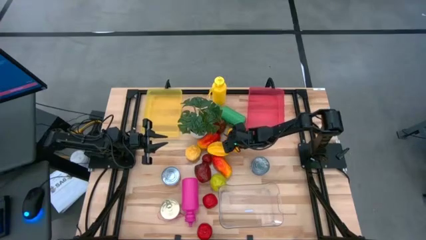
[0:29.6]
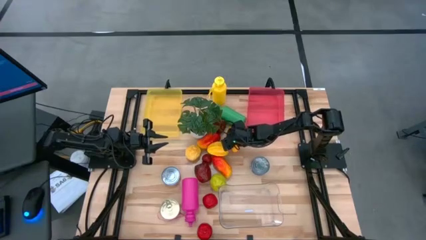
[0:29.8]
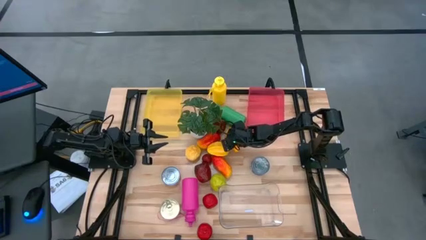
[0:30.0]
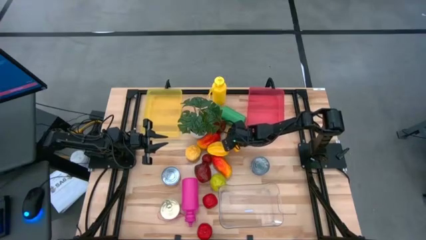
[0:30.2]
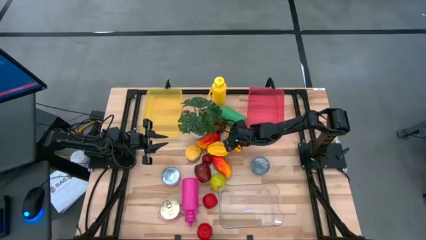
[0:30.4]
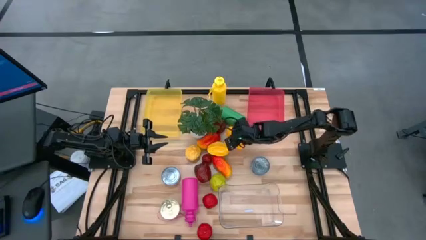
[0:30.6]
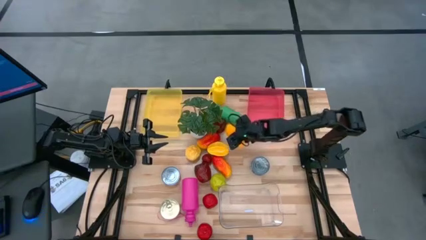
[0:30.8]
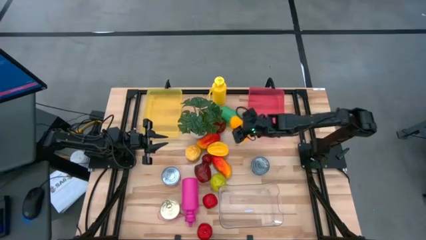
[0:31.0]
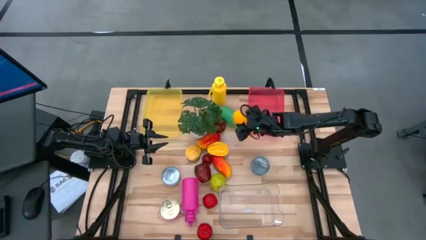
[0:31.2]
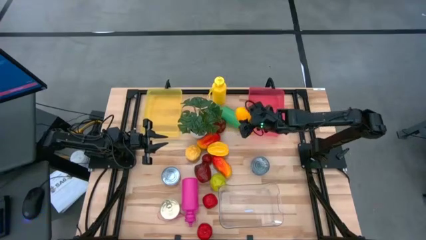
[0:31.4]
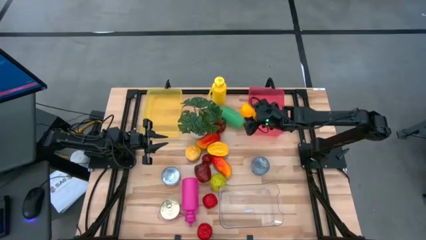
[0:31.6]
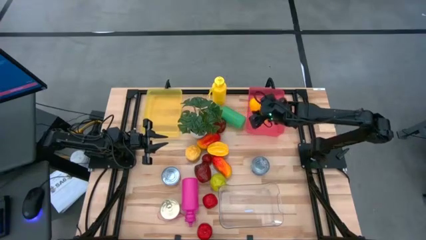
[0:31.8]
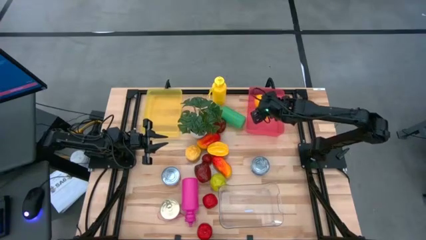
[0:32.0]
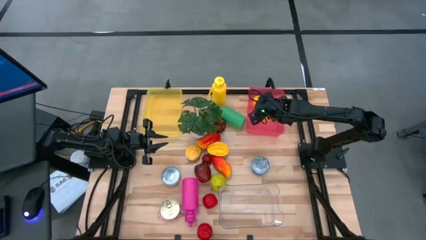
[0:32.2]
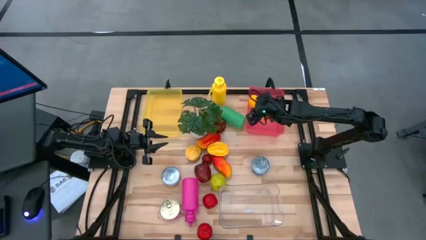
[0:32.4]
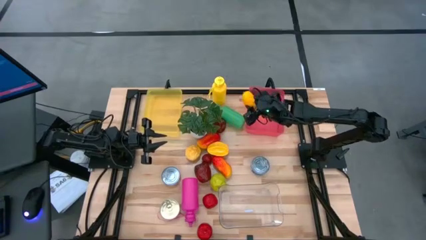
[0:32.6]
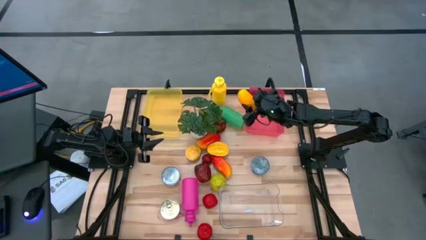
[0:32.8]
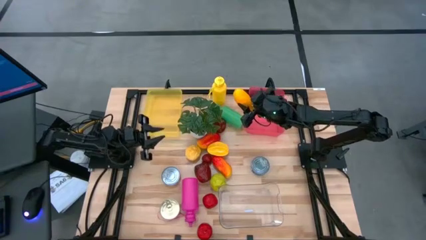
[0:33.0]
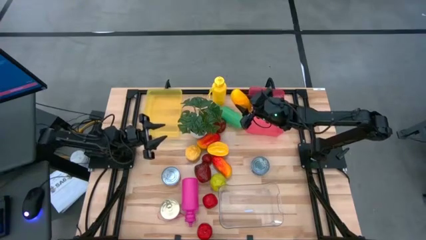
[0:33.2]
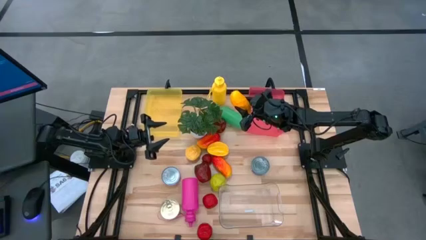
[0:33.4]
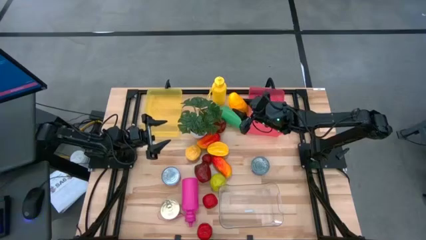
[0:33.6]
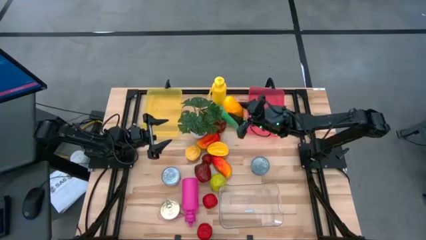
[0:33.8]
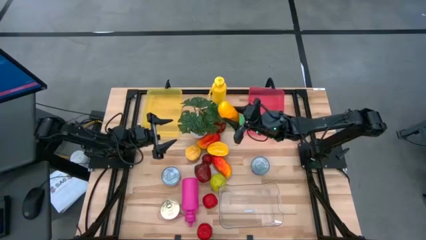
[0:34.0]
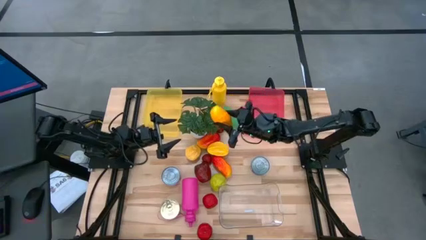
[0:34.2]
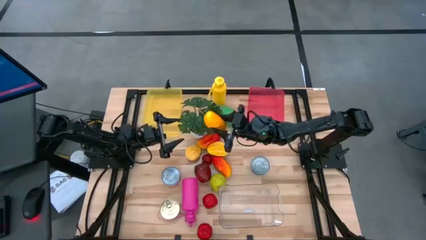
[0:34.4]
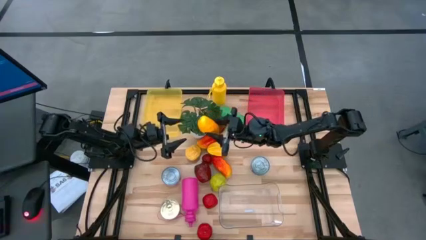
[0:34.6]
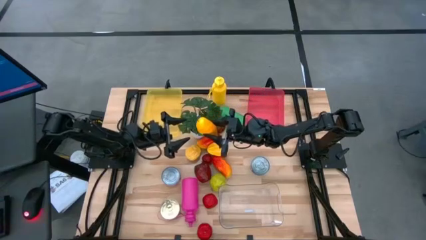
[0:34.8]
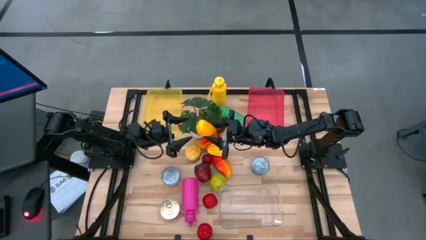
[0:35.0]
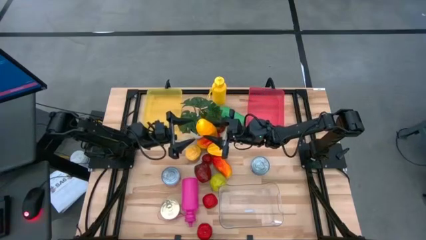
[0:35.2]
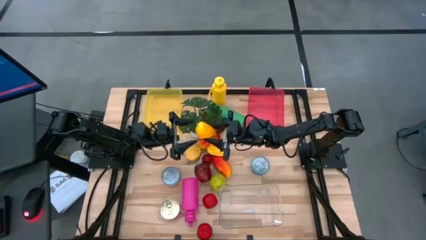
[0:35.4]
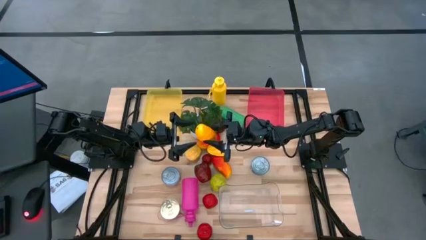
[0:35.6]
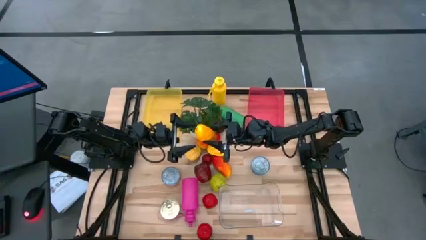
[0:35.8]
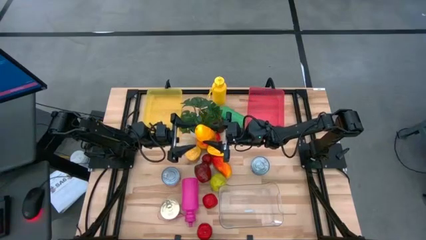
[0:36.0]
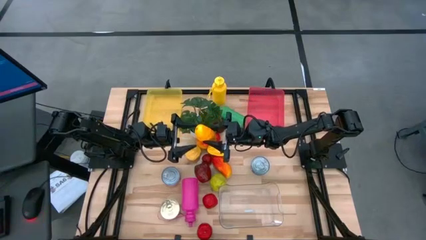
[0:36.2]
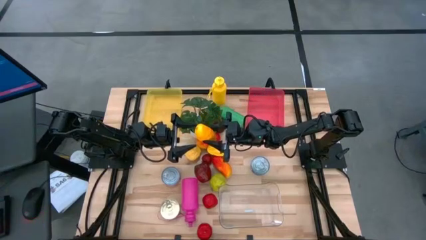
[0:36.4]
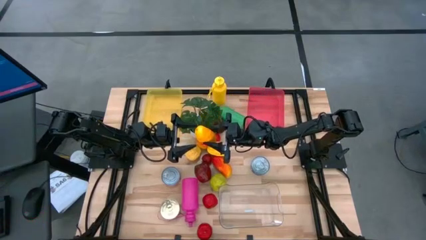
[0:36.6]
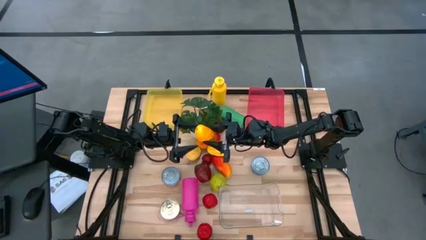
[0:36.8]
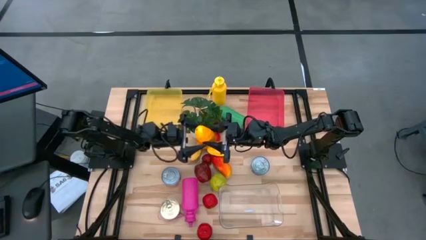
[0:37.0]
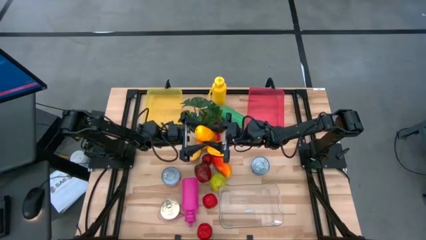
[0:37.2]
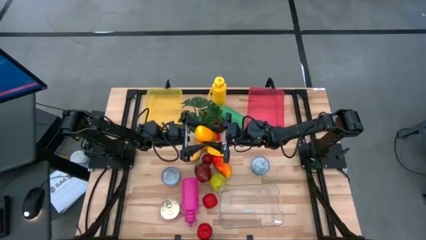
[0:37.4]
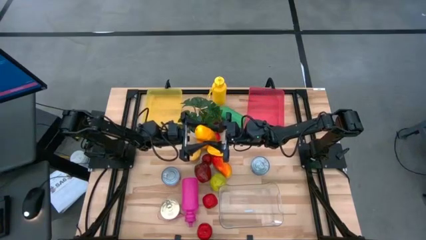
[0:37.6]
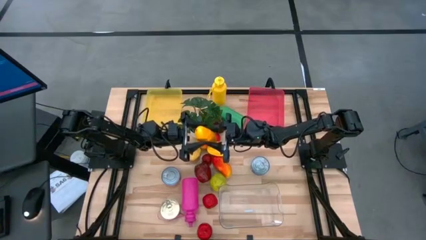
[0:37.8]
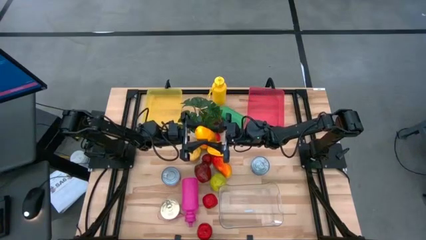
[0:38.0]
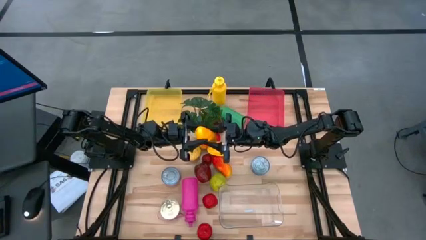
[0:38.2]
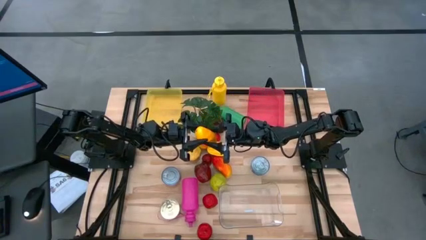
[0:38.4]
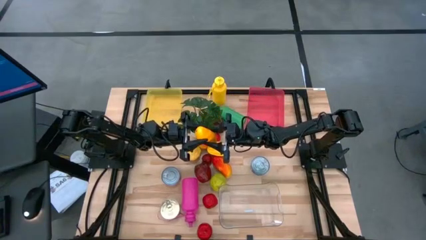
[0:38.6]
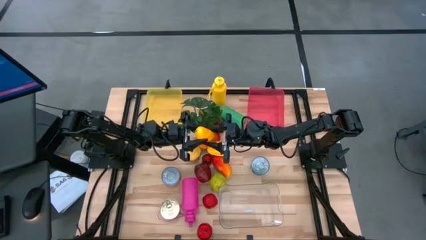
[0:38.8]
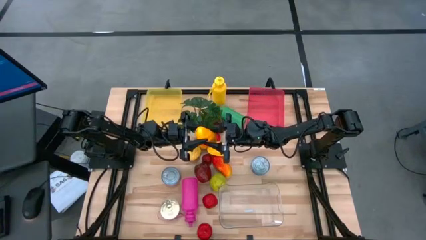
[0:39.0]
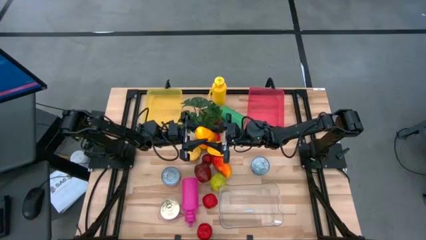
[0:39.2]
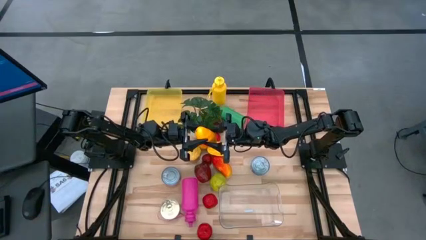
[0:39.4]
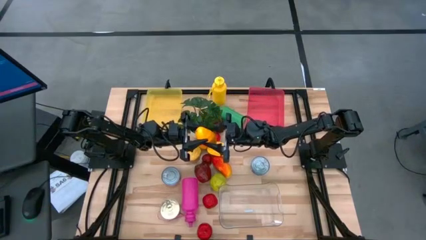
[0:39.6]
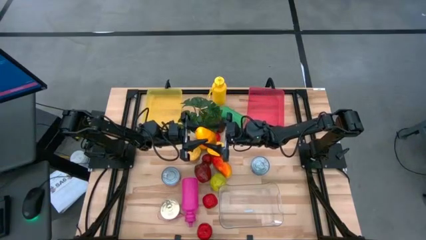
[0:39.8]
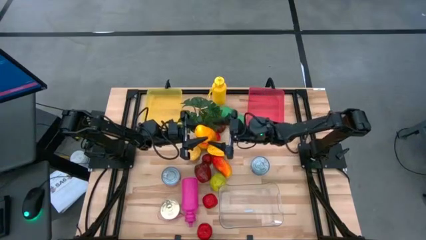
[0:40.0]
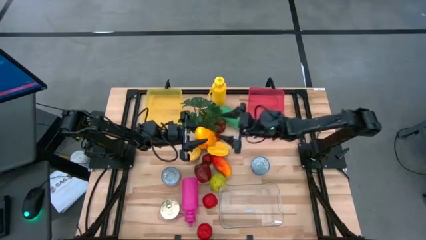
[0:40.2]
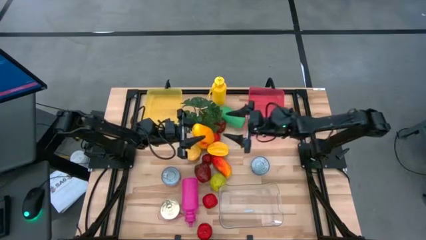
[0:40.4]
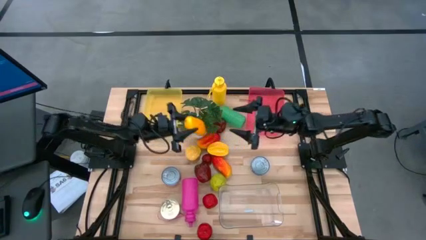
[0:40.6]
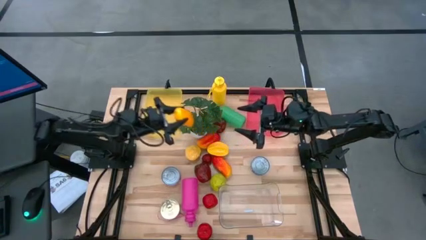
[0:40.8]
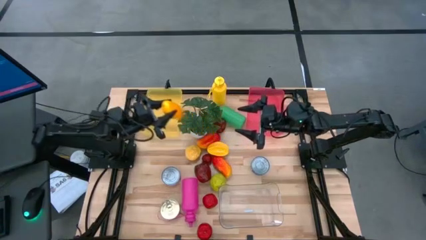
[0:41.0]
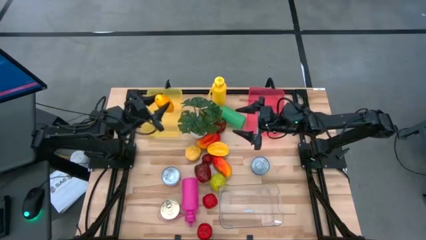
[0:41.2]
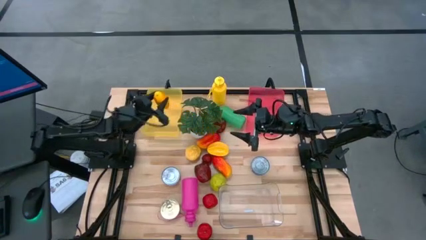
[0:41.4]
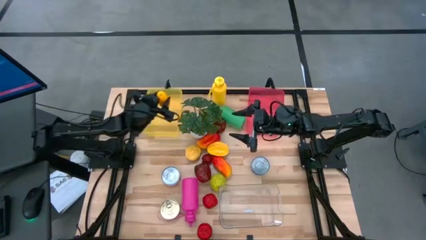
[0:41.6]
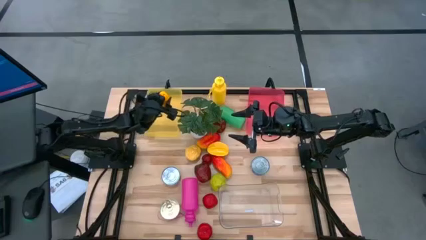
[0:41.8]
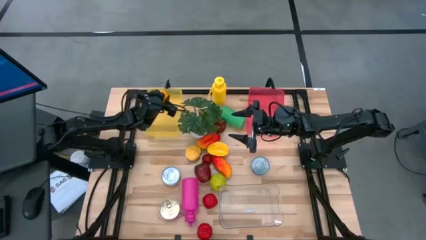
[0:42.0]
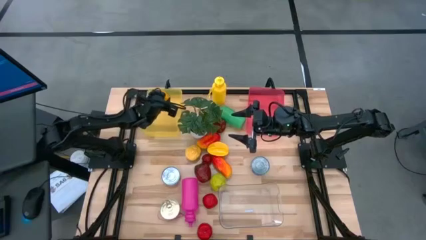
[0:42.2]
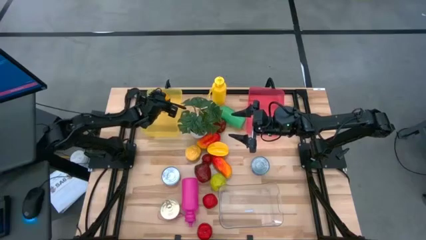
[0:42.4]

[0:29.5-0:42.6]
Task: Pick & Place Food Item
Put the yellow mango into the yellow bin
